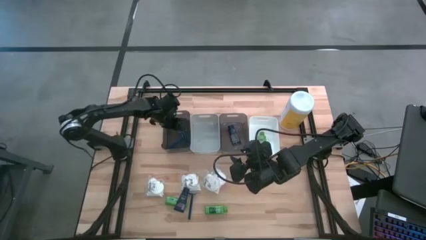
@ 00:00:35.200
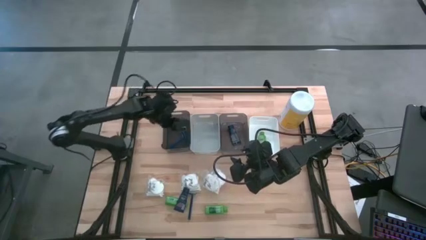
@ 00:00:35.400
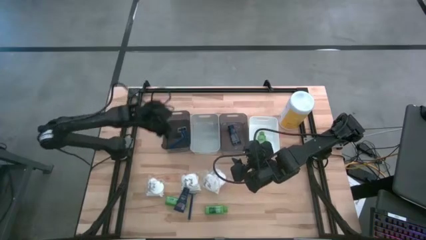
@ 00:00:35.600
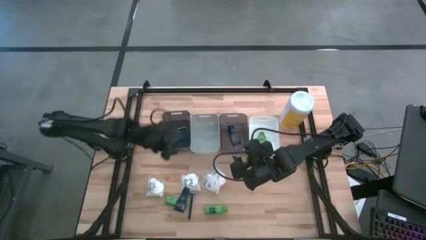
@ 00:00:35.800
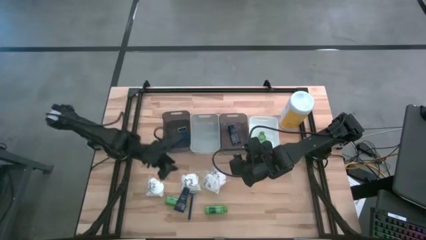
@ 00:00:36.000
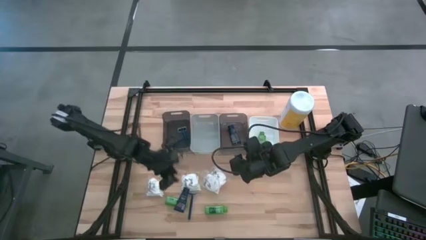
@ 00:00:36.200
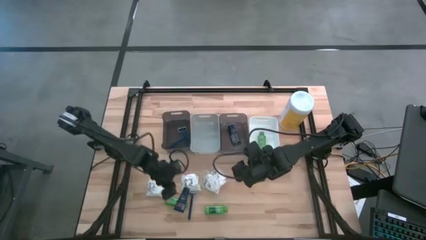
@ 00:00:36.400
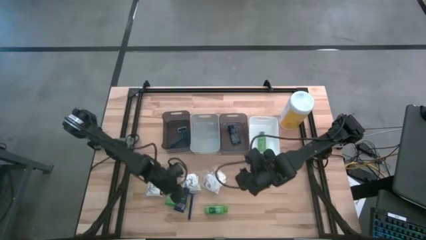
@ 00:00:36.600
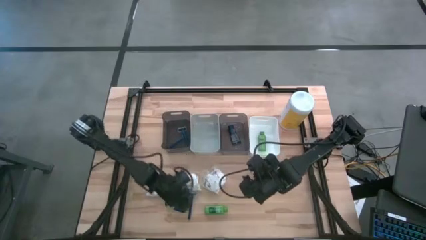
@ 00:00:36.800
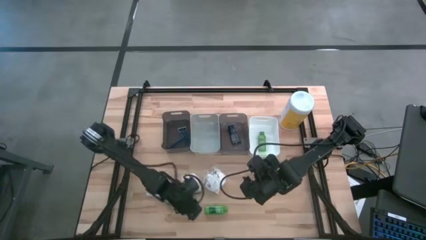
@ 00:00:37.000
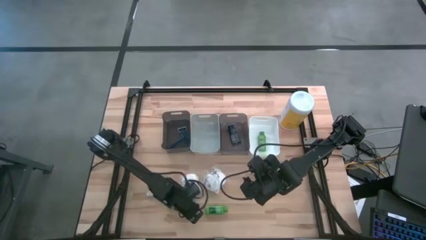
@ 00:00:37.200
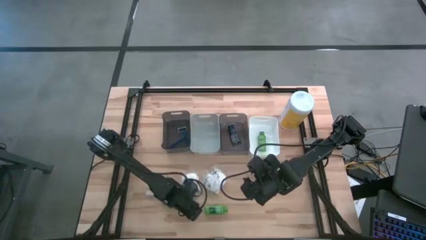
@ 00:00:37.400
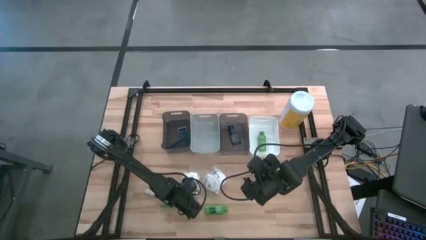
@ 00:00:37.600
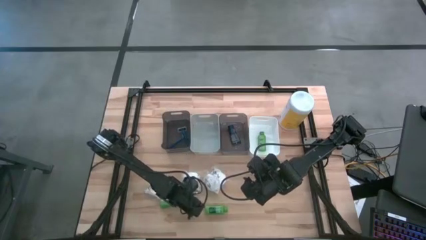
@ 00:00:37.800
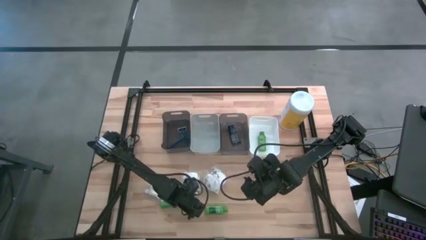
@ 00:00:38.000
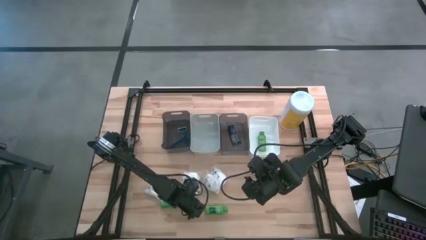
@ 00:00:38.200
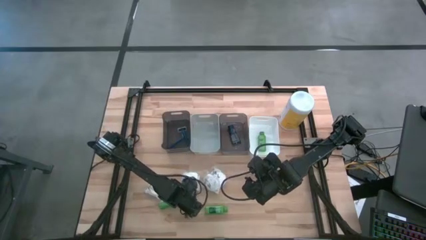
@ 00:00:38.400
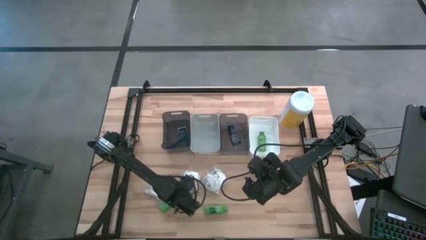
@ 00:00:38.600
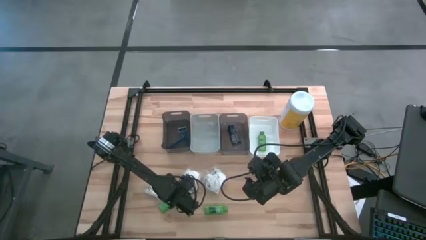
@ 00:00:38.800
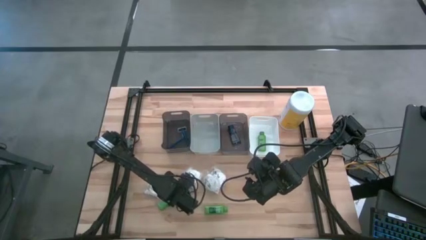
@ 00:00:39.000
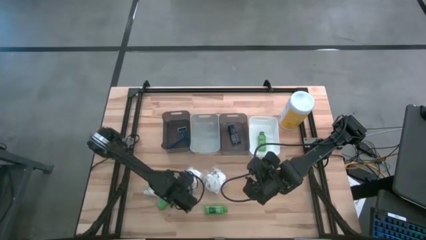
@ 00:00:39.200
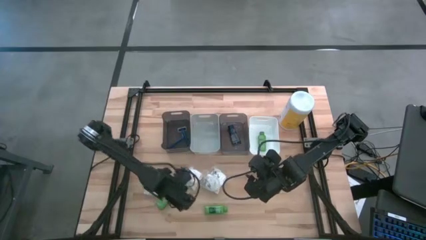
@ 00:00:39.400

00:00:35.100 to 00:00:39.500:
Task: Pick & Place Travel size toiletries
Put the blue razor into the left black bin

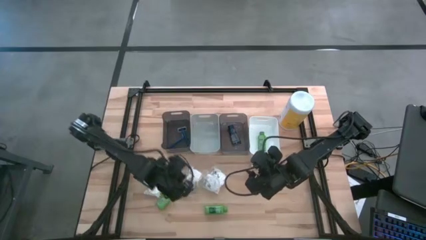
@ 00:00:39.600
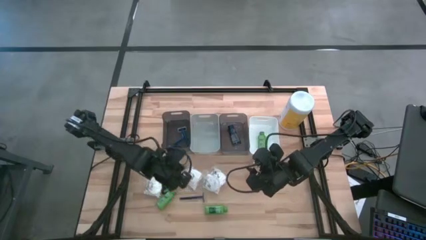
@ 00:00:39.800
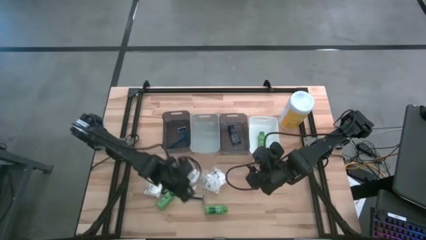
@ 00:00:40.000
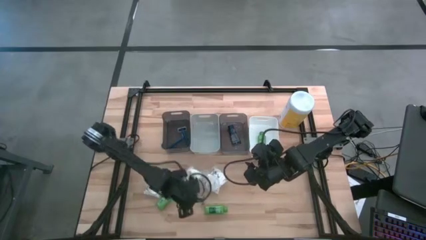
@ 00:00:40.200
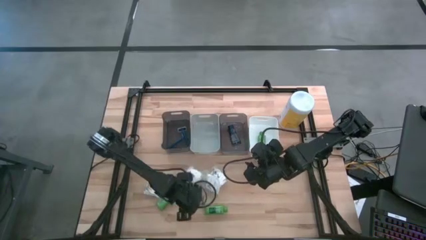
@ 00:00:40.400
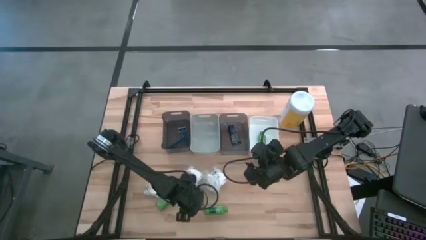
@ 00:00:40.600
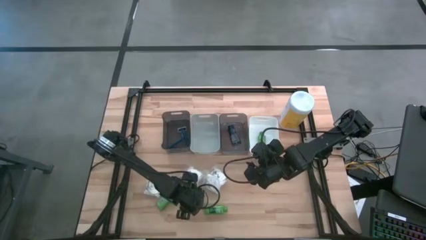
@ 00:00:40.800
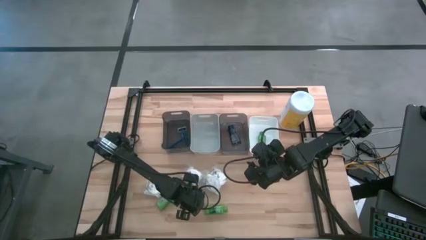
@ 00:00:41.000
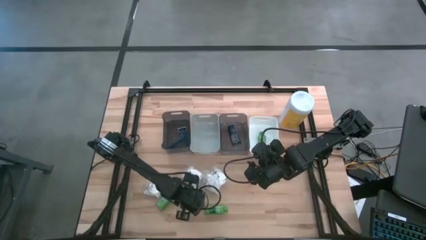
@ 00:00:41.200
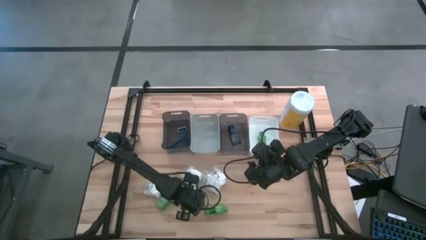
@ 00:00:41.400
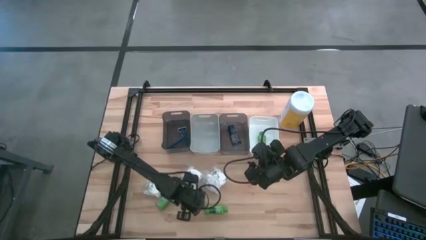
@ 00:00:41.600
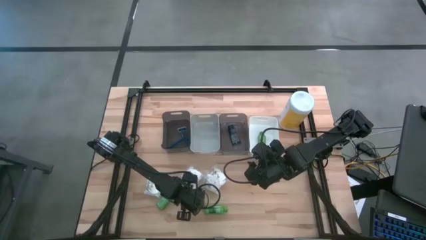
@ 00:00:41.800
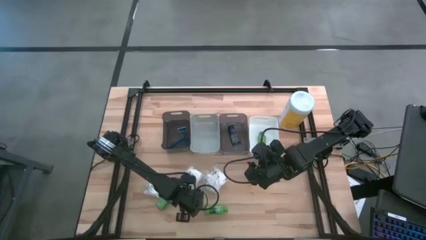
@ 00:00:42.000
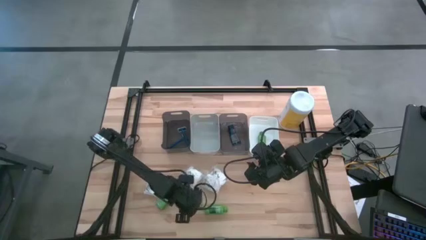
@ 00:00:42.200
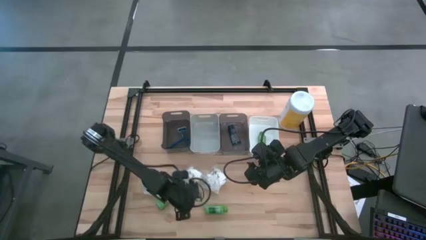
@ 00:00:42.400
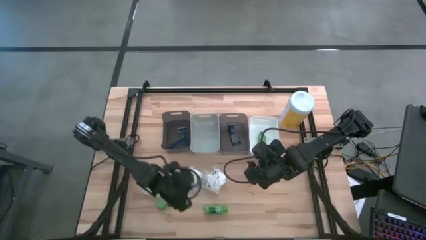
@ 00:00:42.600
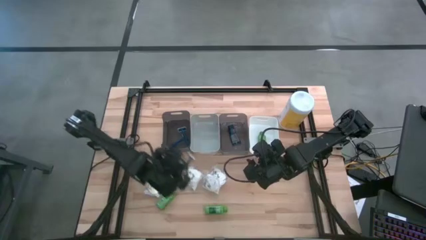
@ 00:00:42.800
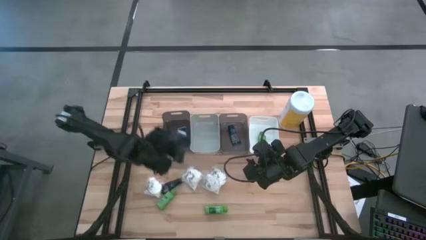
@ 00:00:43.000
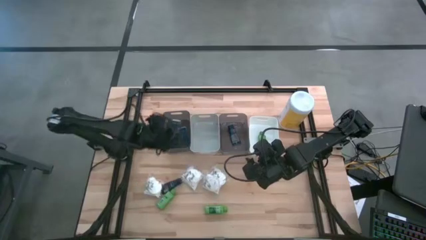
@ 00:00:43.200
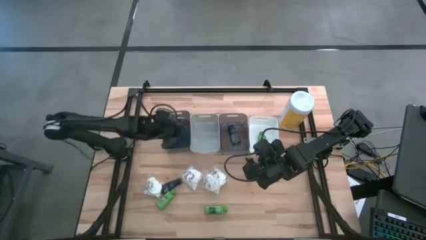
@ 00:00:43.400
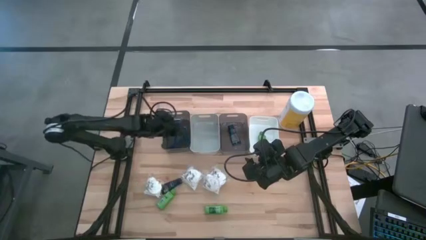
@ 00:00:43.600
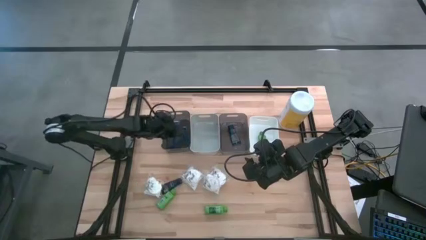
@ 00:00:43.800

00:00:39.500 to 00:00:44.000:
Put the blue razor into the left black bin

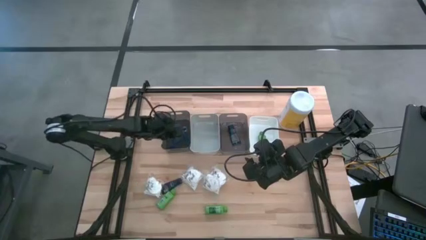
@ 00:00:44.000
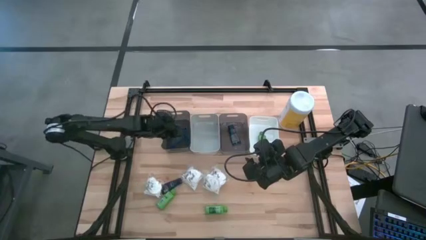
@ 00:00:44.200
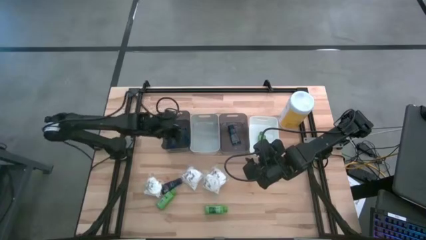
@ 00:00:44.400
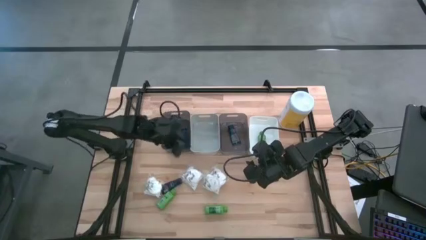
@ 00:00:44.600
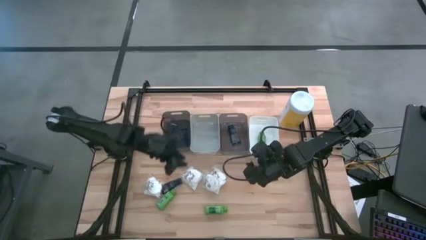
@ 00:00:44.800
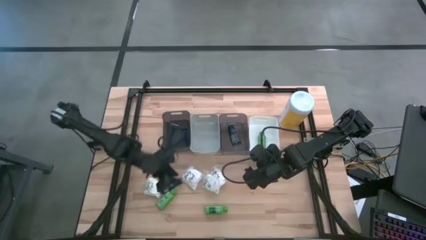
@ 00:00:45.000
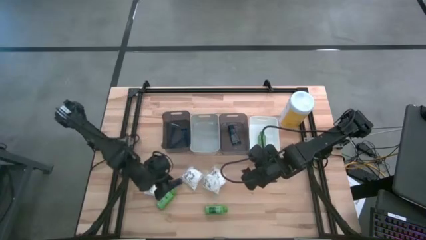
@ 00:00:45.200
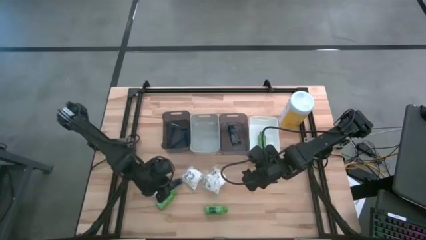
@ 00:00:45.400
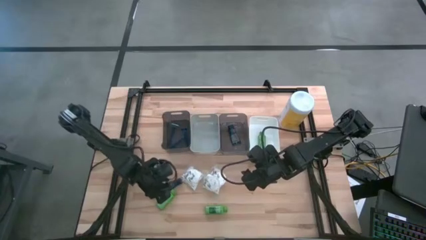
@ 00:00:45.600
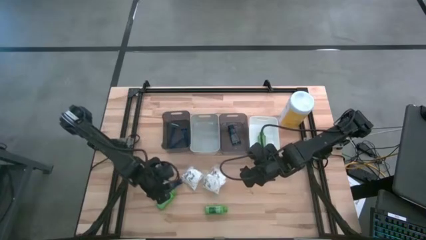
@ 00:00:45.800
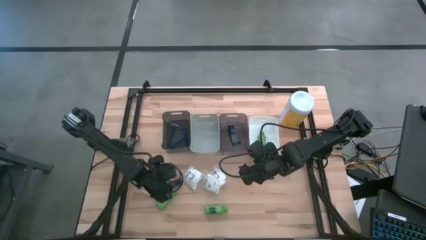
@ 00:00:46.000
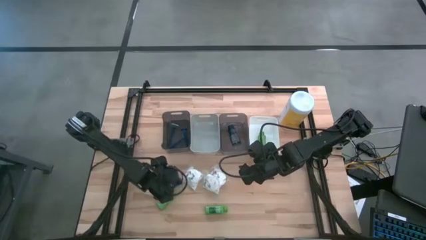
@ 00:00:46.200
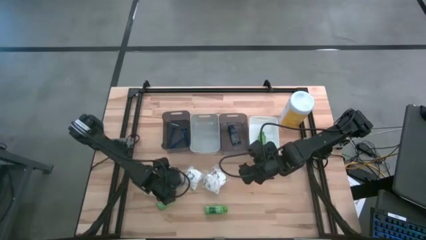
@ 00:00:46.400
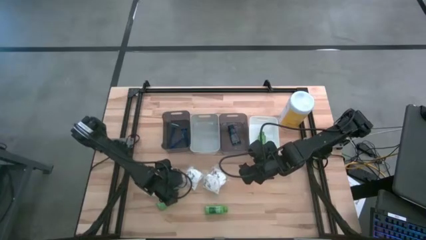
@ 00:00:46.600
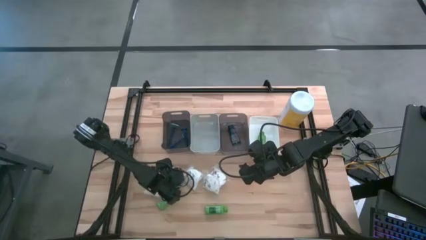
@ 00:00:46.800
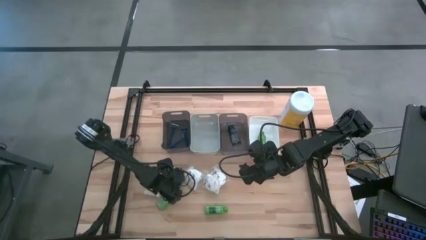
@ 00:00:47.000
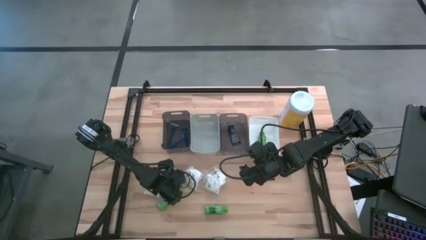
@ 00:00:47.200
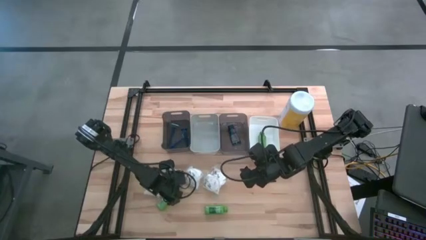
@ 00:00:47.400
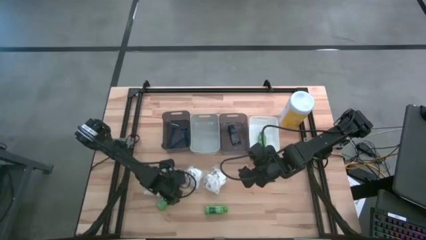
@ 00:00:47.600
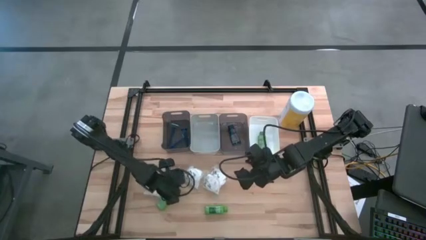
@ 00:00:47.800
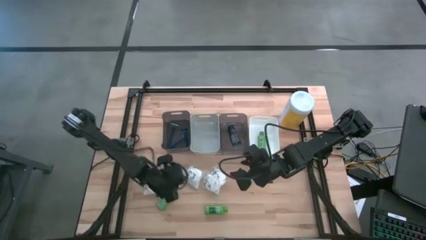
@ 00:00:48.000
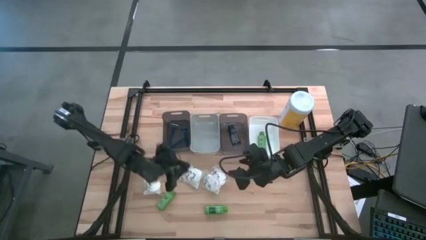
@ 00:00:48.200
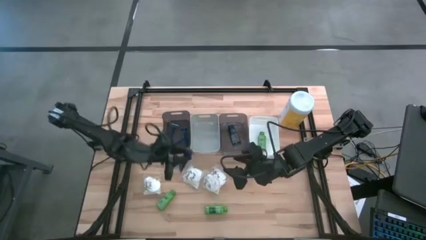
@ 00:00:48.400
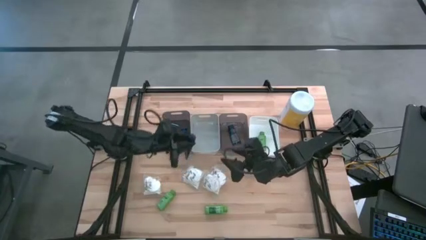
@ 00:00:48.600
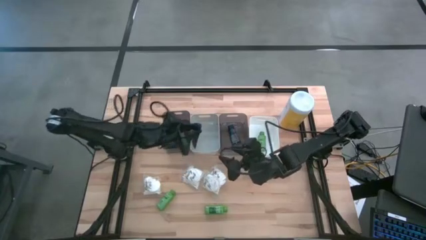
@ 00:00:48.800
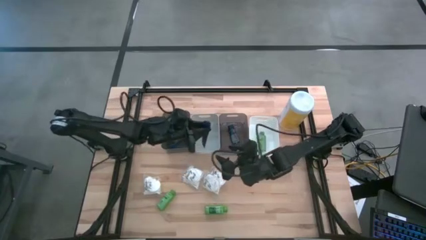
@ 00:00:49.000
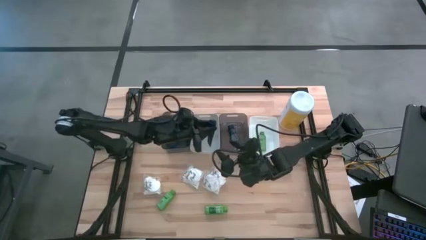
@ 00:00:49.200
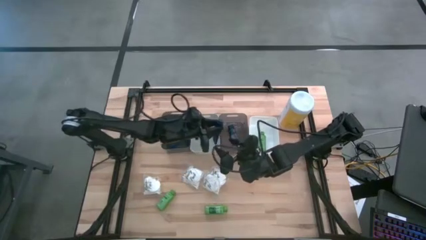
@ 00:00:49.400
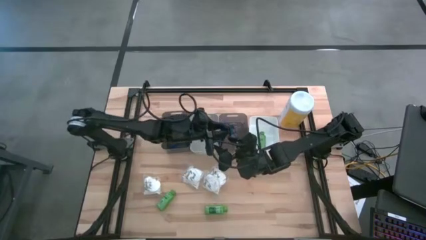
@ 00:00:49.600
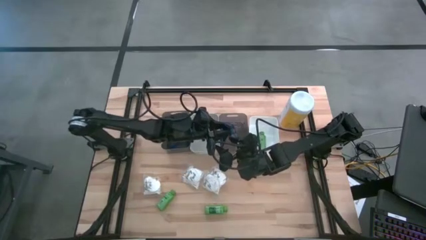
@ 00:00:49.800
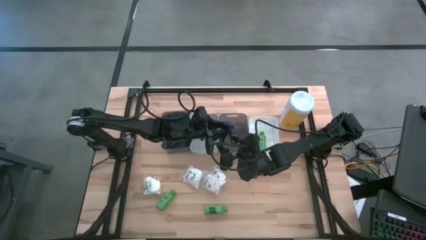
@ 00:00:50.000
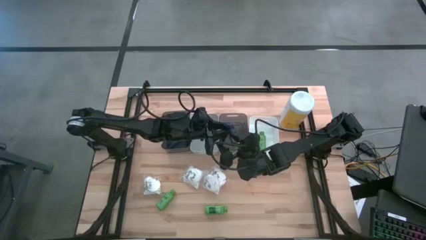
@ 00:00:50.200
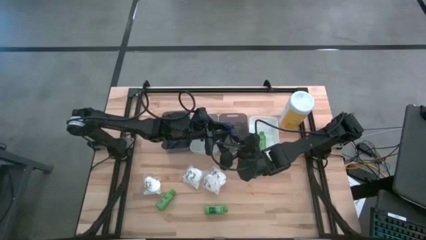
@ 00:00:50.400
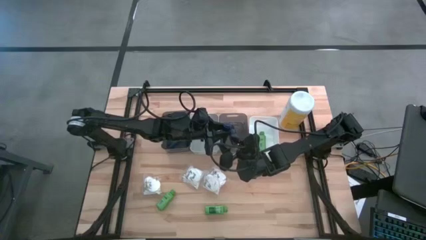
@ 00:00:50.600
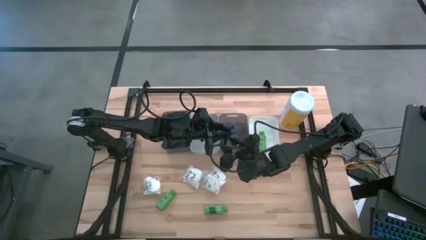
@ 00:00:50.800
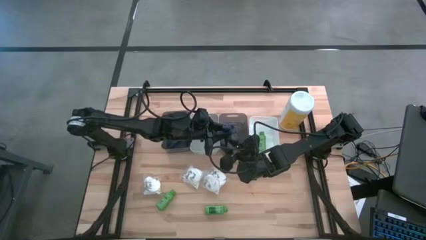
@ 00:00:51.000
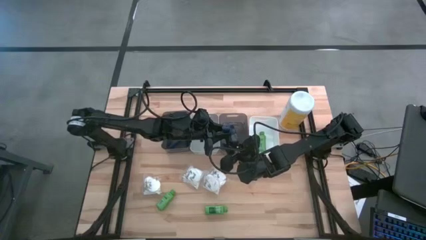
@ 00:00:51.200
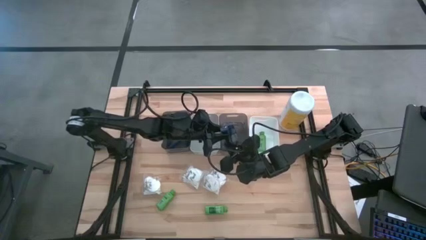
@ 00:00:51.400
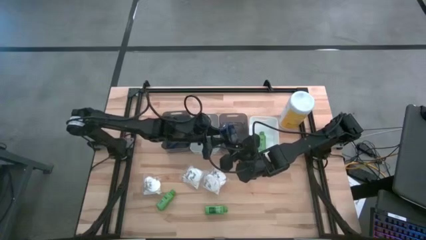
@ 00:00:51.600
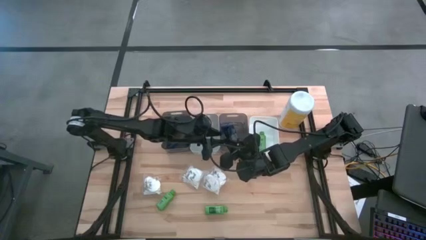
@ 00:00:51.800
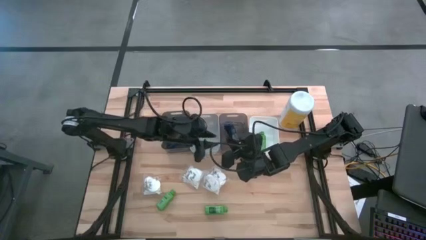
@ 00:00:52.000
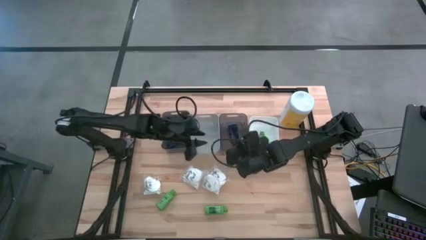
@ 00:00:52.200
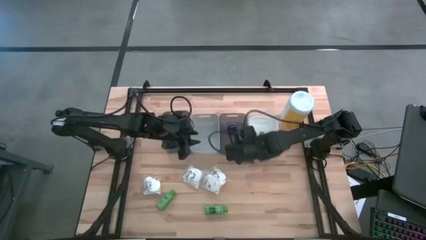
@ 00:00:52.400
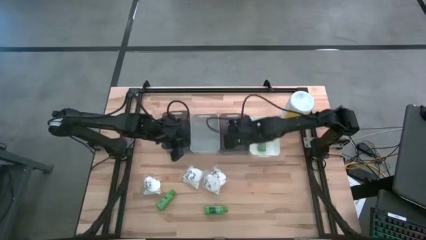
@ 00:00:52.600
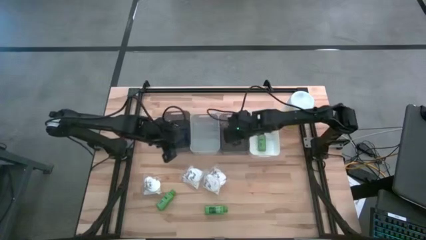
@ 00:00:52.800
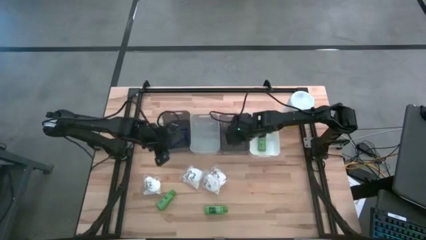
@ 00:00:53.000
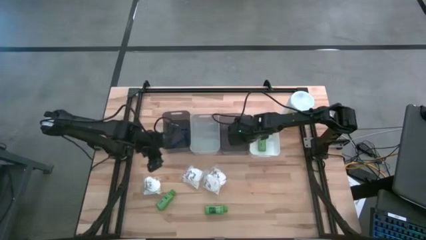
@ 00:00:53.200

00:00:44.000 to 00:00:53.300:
Put the blue shave cream into the right black bin
